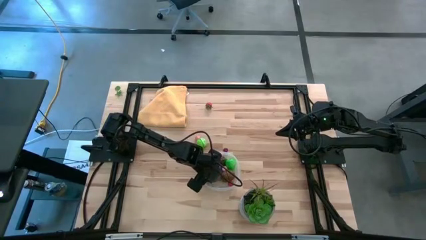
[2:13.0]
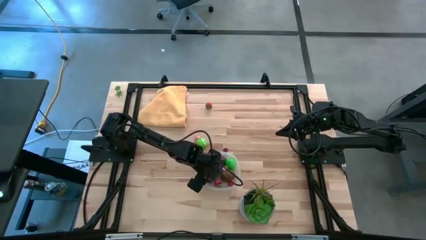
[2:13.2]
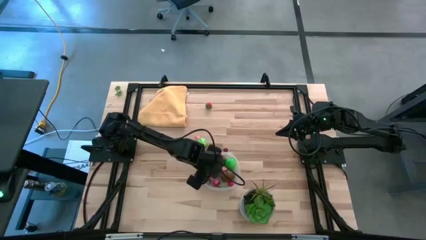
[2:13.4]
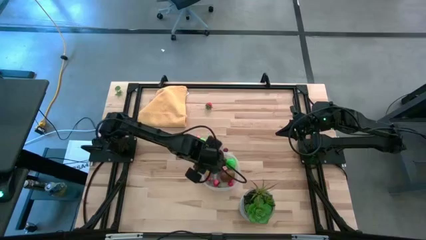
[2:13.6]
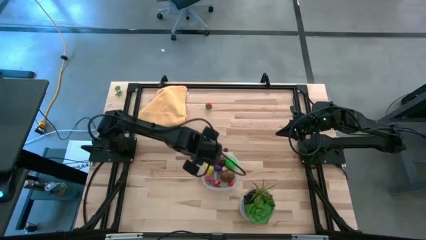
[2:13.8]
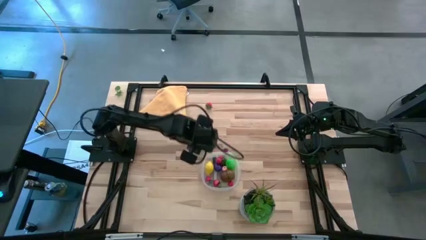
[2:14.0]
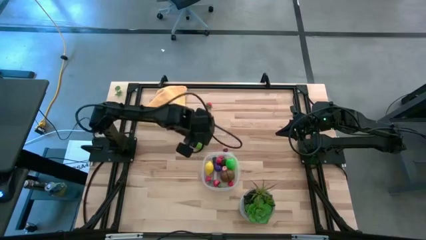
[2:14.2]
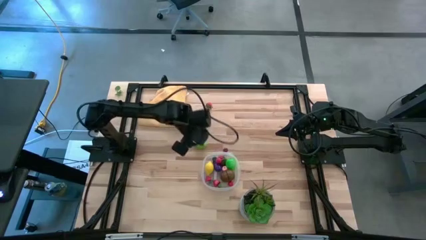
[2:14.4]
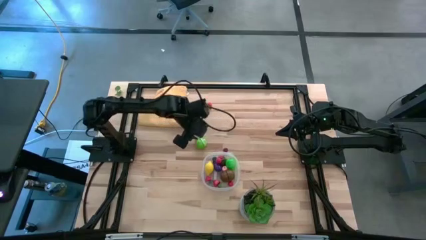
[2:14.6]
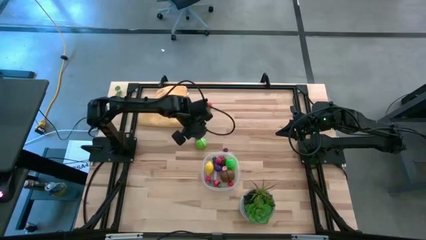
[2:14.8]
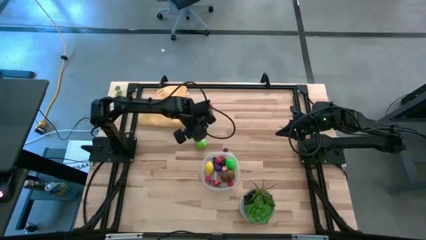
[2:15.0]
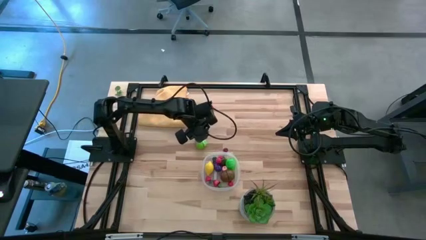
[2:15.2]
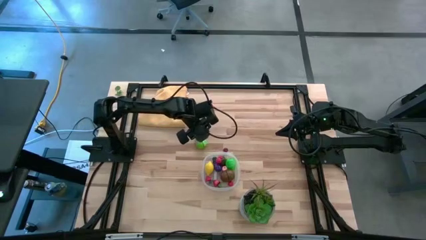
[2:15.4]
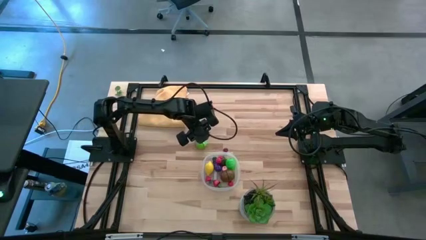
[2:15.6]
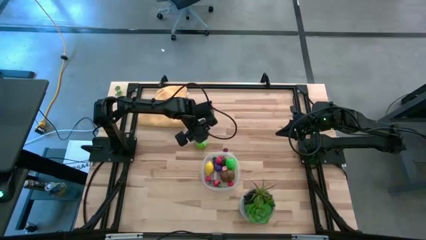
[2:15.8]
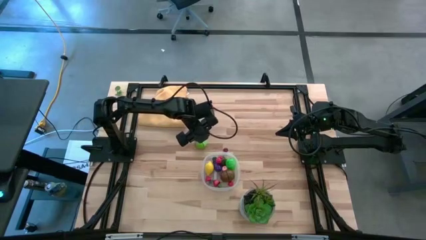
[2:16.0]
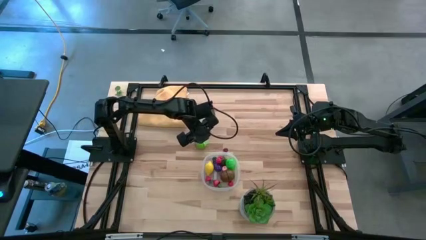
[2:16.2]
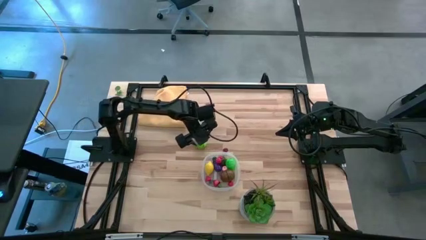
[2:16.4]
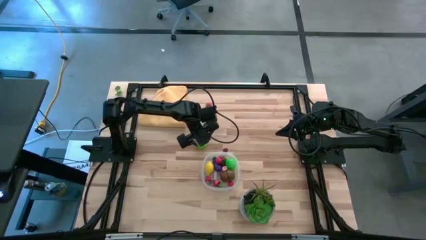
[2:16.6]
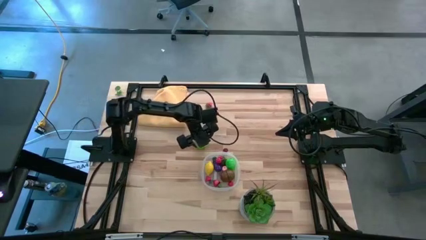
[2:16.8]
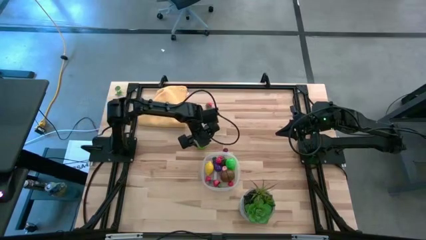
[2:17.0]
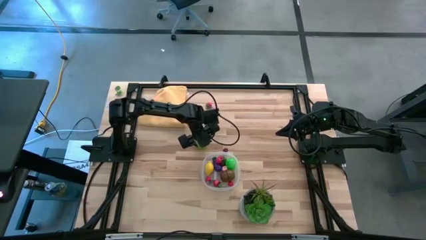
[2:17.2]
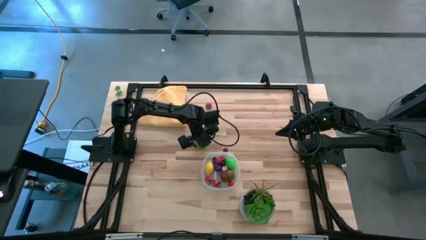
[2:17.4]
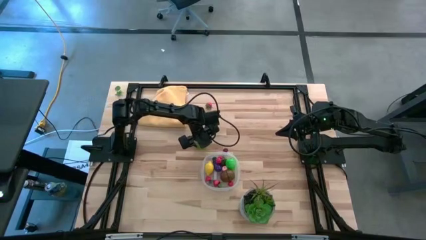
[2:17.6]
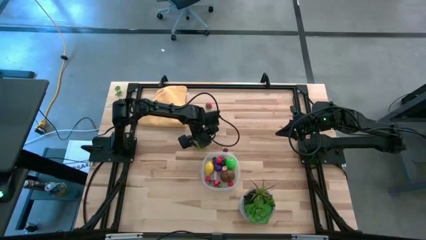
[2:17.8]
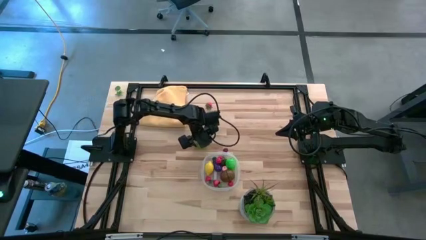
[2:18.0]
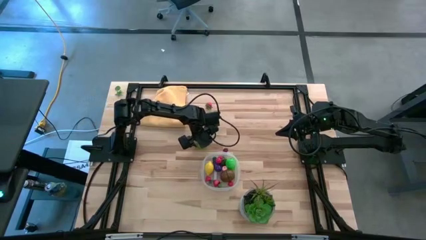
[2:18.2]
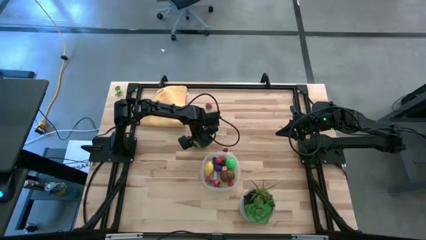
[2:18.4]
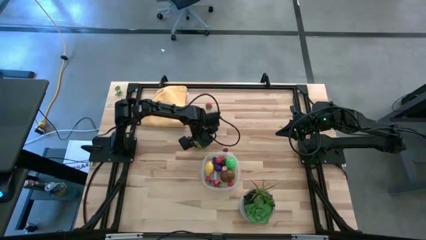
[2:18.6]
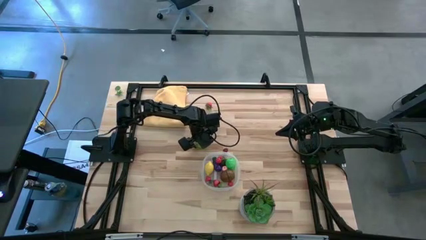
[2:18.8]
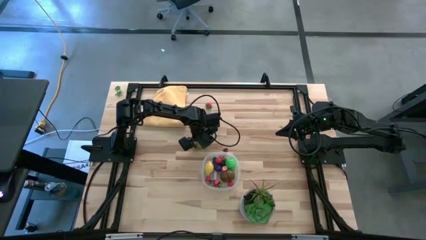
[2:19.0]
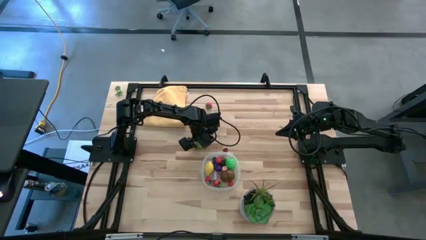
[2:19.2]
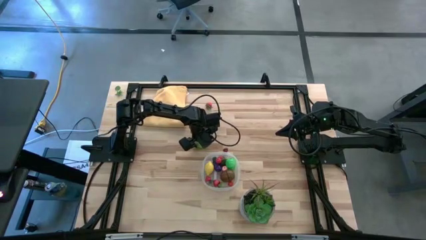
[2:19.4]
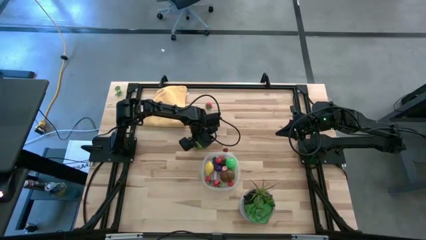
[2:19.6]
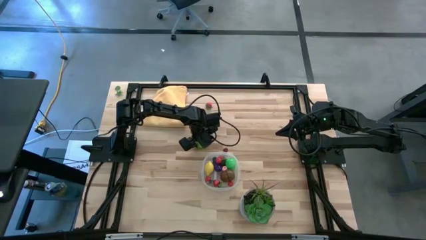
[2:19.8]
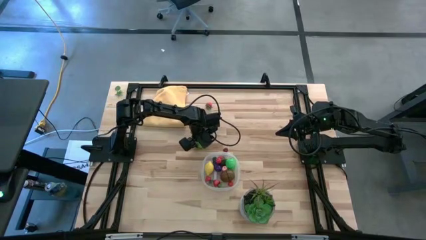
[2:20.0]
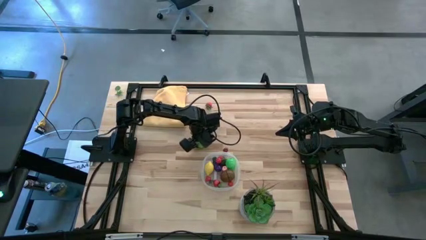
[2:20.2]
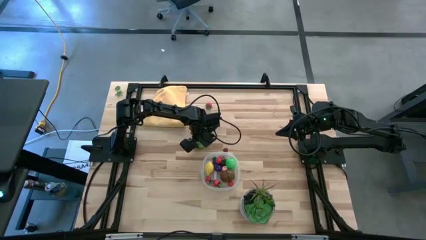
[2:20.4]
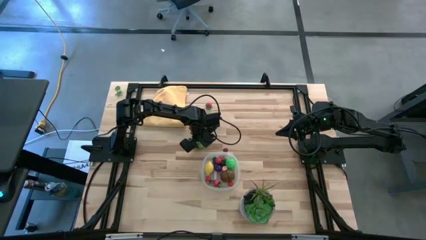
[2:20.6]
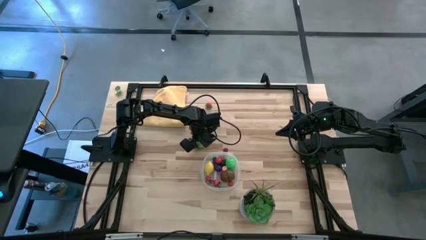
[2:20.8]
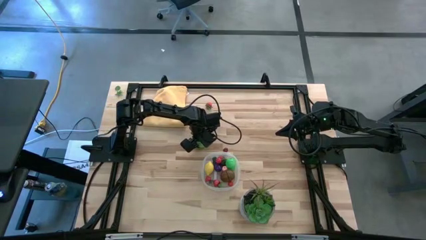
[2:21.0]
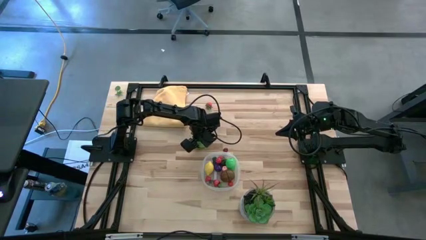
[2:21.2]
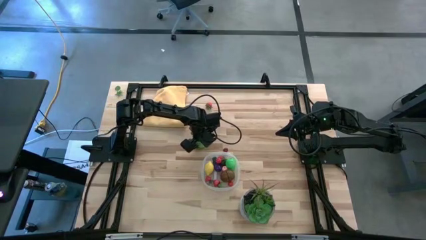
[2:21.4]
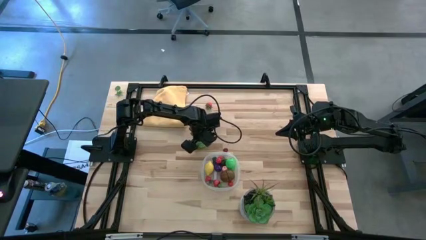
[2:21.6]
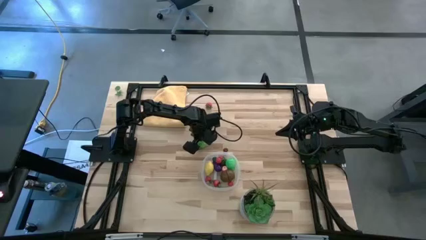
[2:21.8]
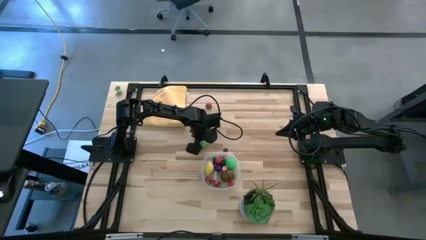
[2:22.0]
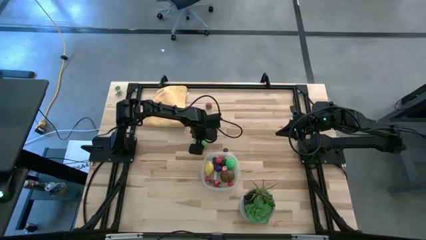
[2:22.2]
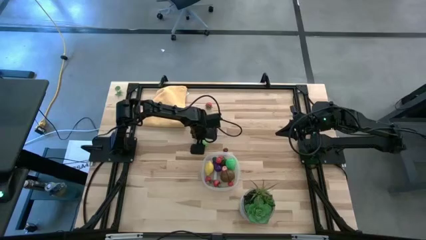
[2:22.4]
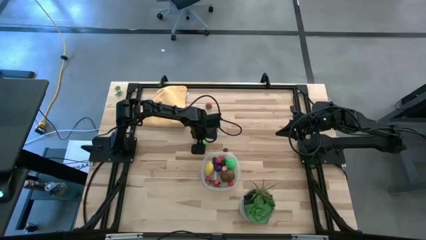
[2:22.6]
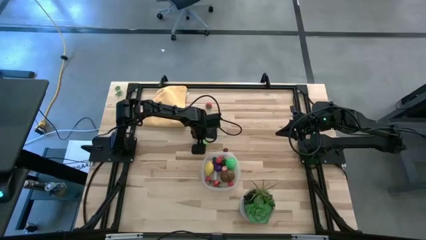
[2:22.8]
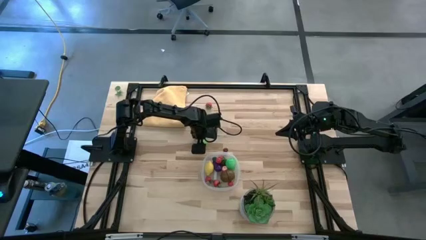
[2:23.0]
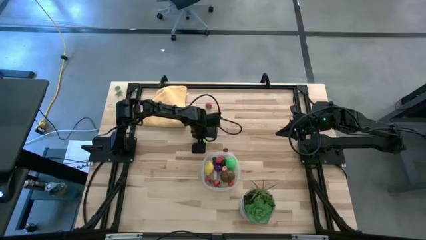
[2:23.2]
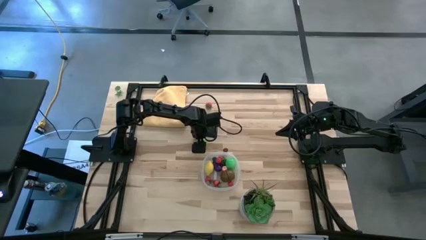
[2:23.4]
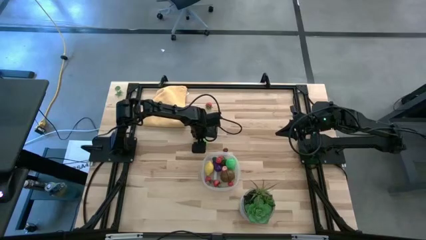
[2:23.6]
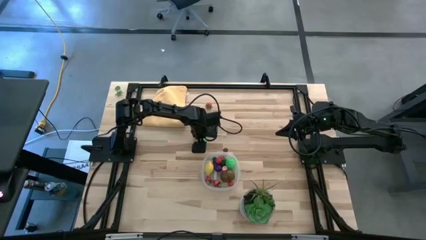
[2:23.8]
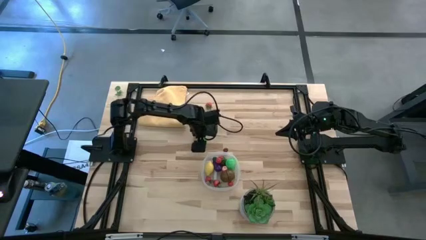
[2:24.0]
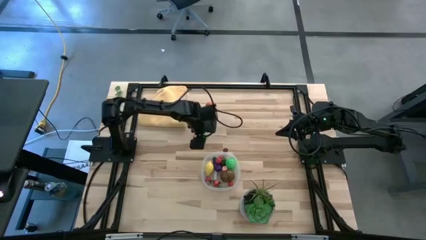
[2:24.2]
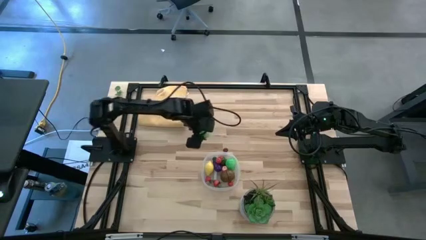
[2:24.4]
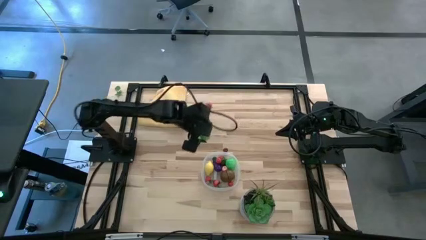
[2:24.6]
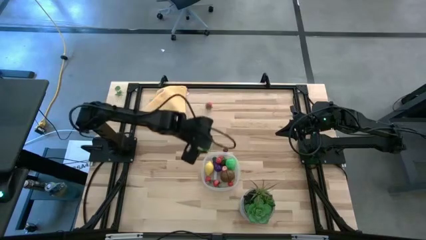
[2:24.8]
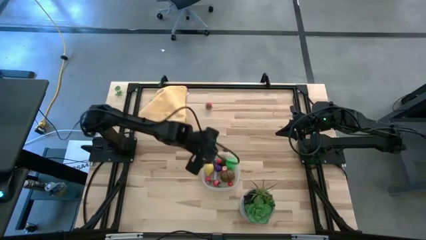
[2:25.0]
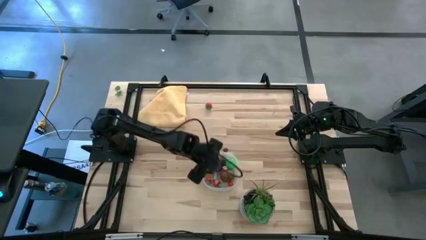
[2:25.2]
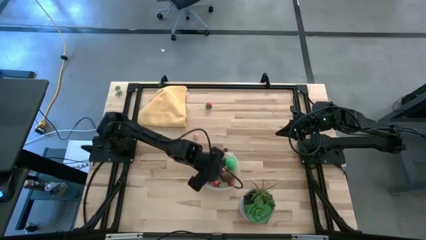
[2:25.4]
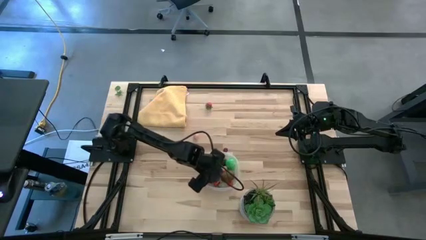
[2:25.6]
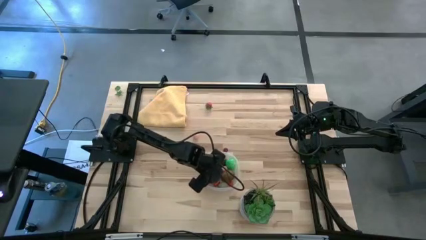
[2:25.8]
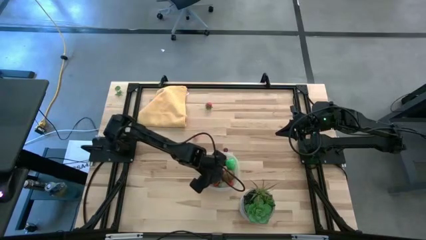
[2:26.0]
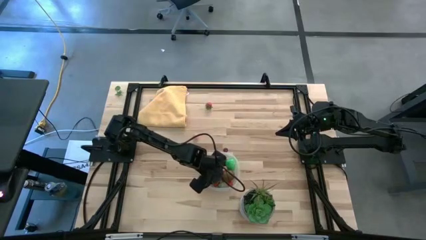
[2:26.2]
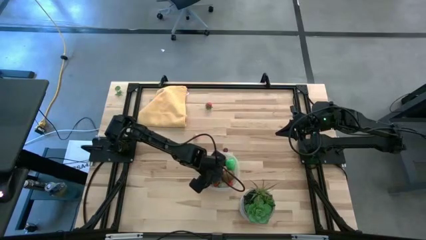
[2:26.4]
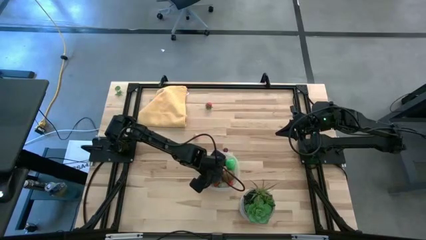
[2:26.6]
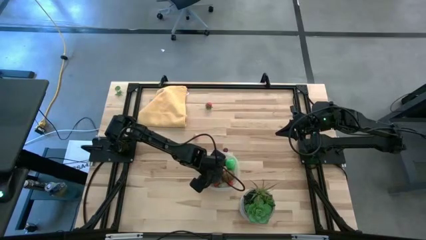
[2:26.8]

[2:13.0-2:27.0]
Task: Pick and placing Produce into tupperware
Put the green cabbage into the transparent bin
